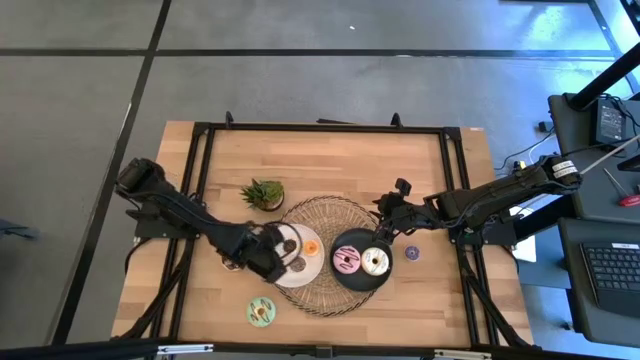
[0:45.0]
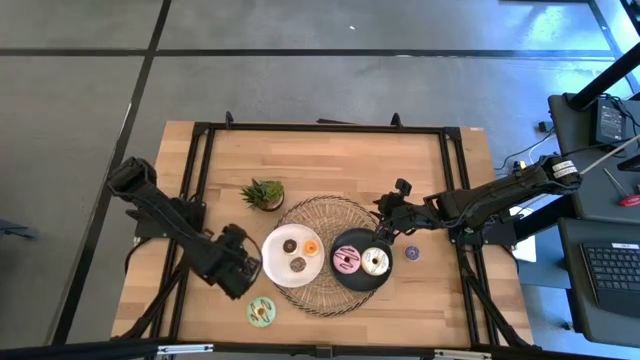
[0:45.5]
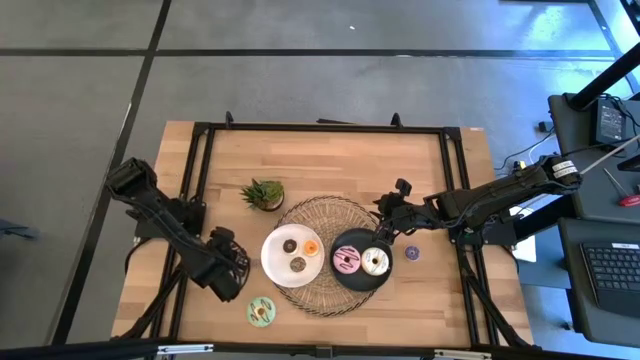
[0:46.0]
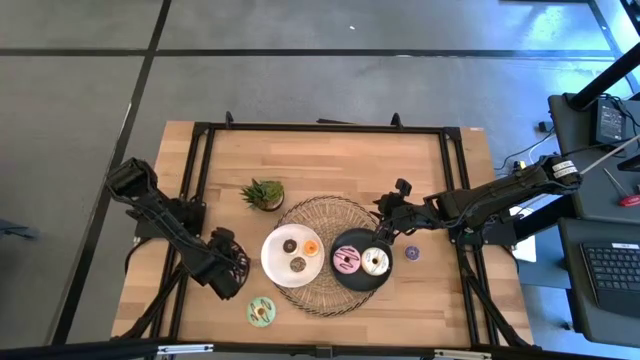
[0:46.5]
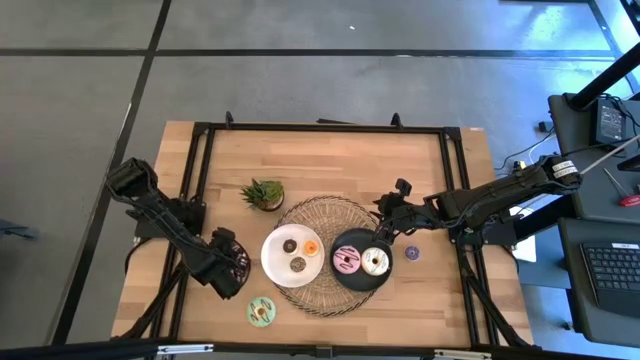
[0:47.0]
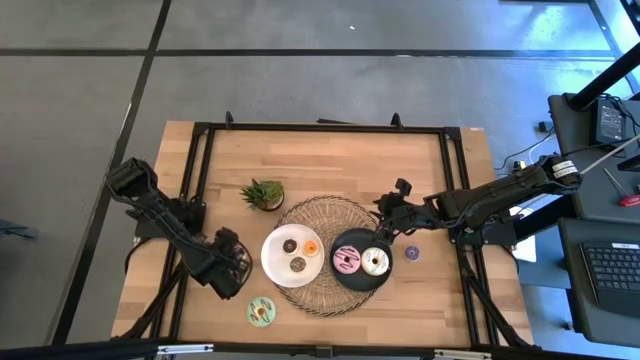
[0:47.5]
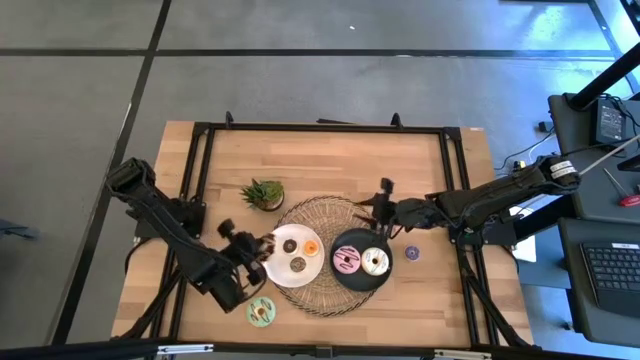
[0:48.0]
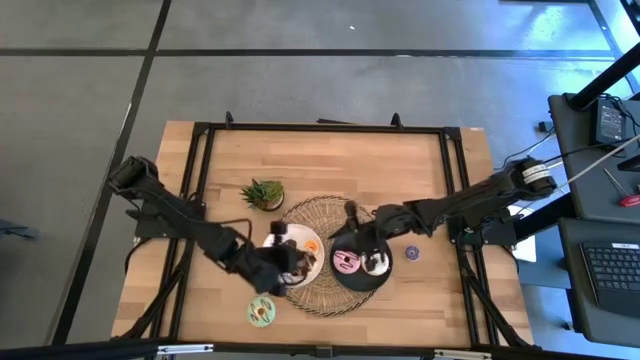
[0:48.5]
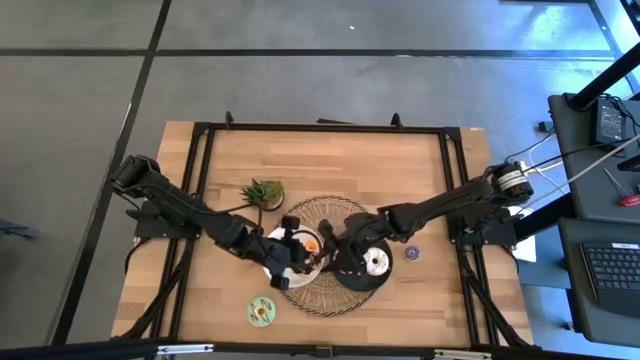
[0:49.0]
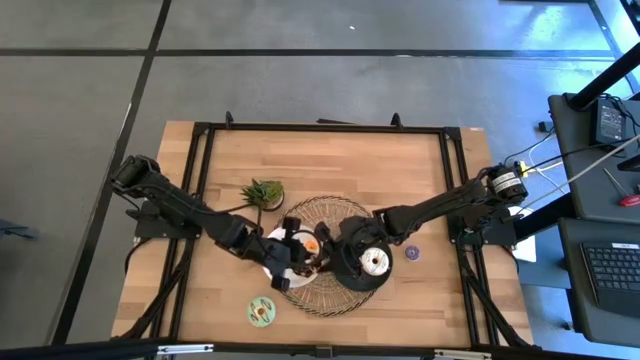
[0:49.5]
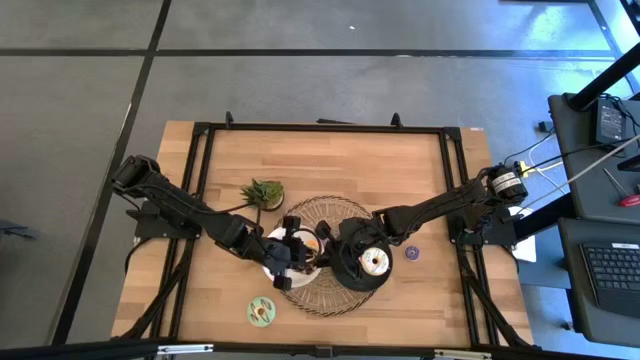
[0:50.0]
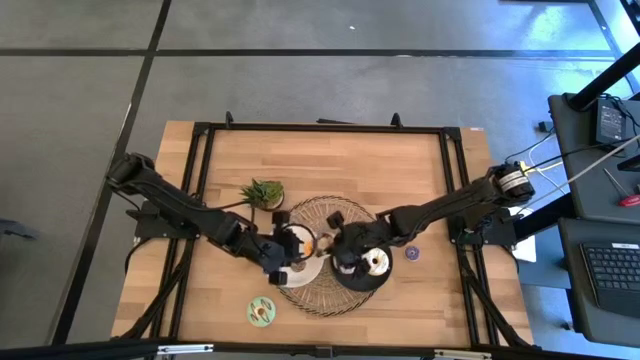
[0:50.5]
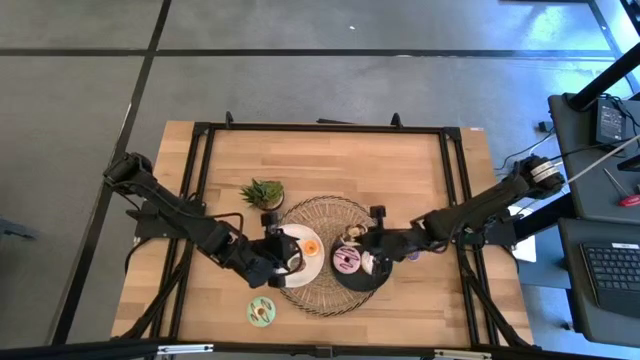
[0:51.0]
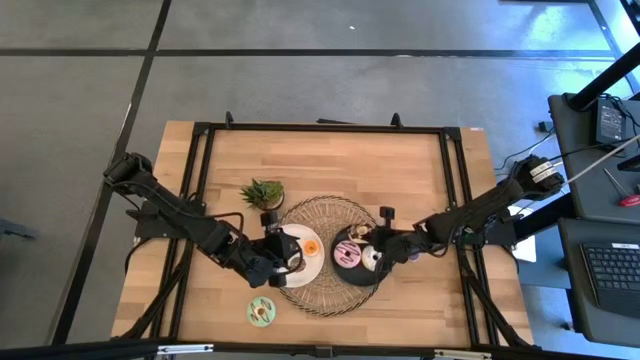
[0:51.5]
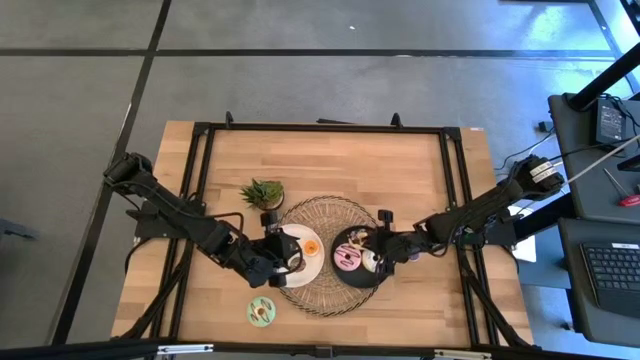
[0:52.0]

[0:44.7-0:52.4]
Task: Pick & Place donuts
Put the large black donut on the black plate

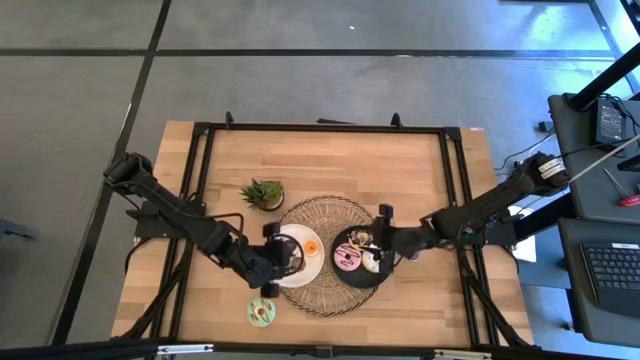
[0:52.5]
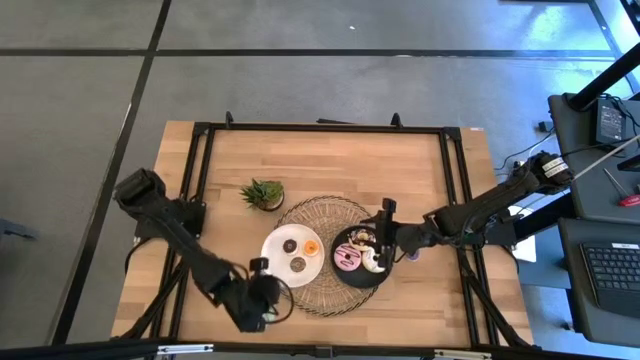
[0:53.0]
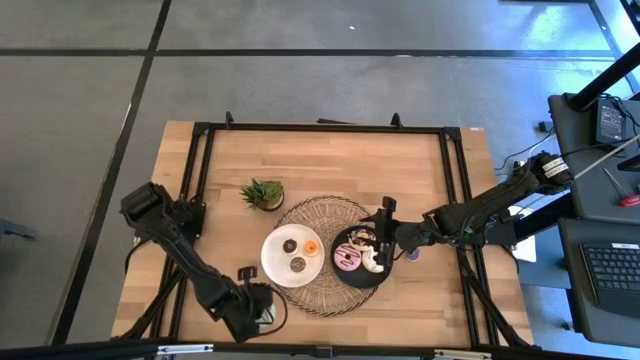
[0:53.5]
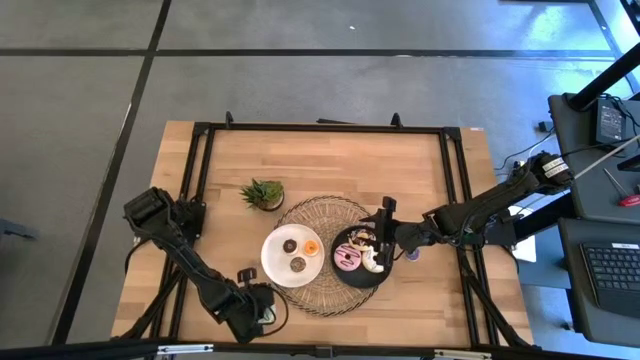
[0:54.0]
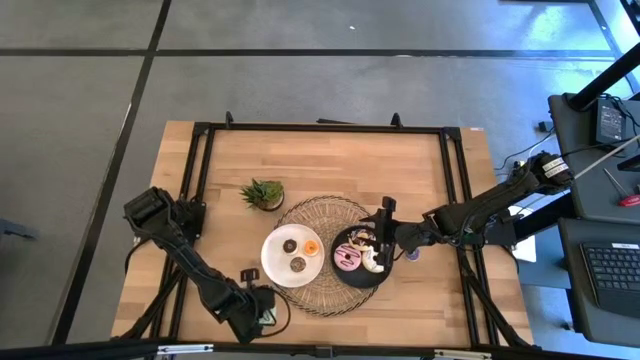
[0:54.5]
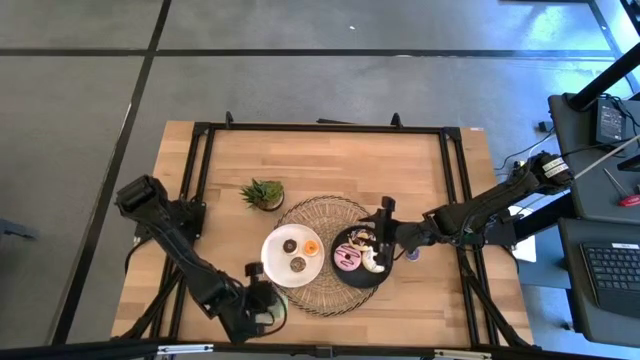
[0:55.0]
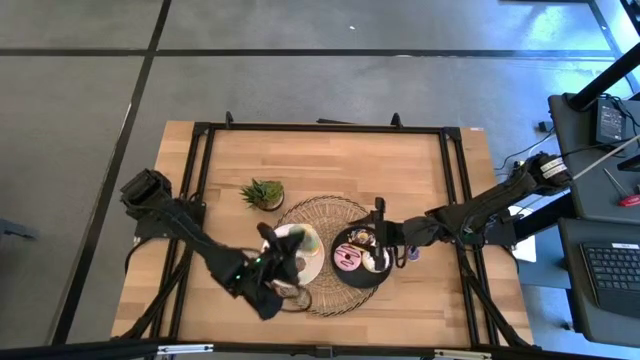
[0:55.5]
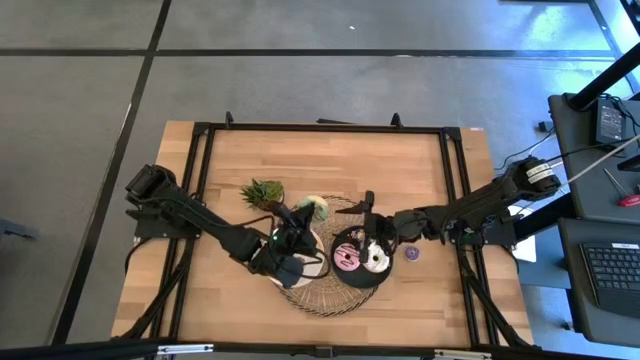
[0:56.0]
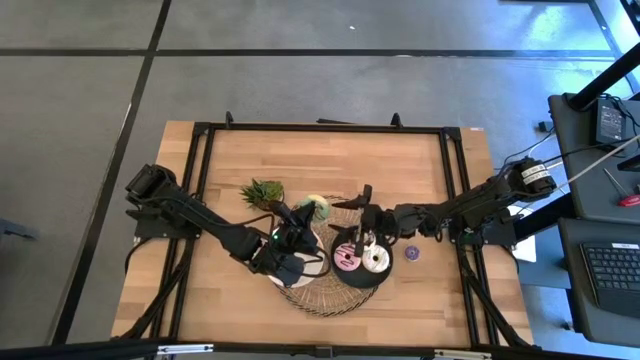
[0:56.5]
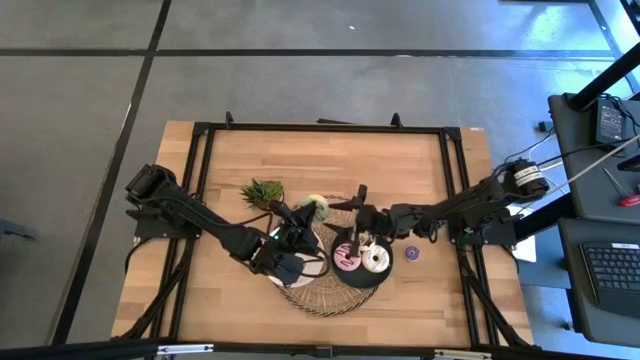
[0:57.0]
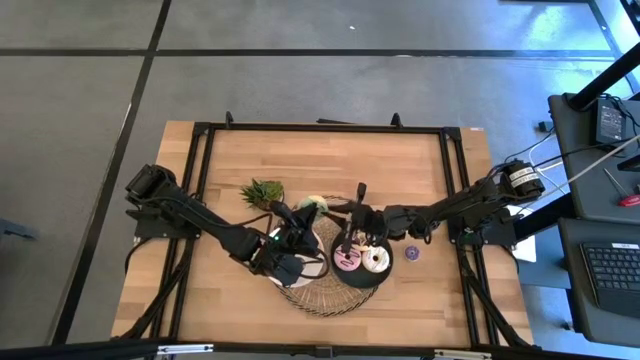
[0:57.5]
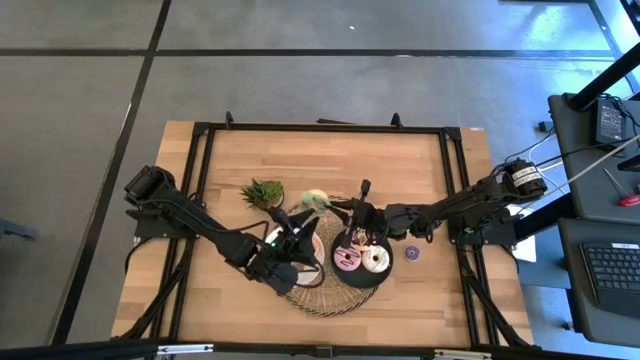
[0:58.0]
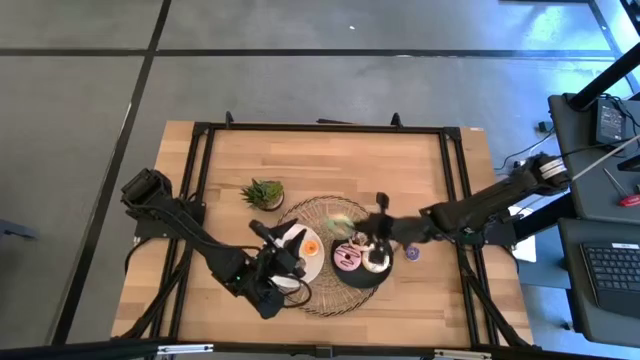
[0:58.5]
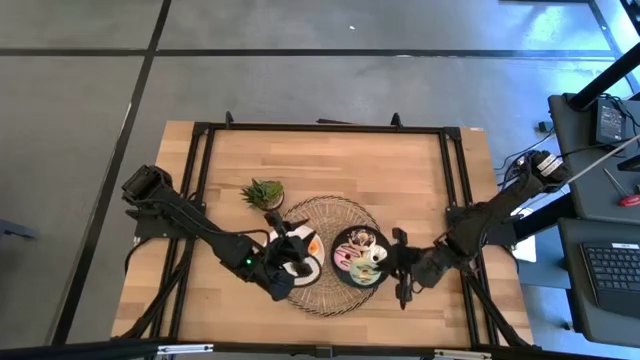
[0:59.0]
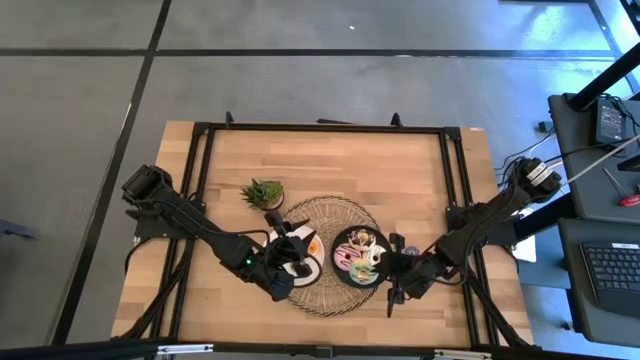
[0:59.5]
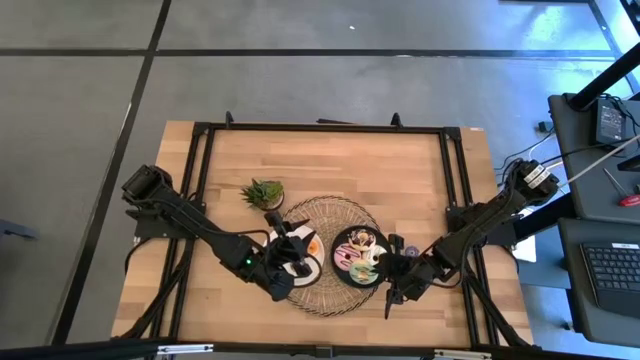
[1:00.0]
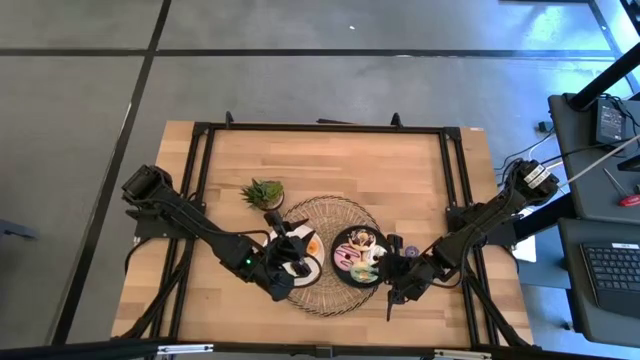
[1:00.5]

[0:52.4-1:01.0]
Put the large green donut on the black plate

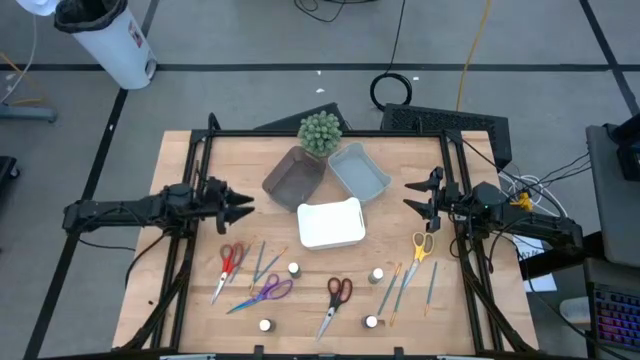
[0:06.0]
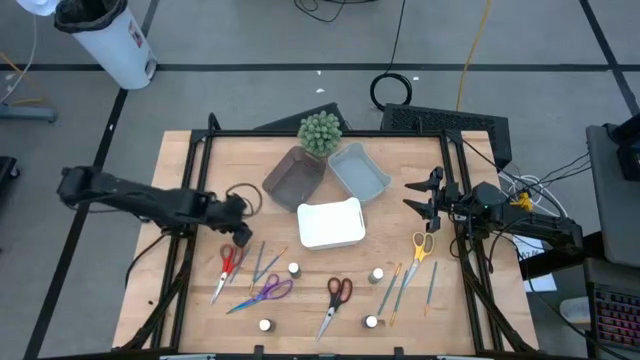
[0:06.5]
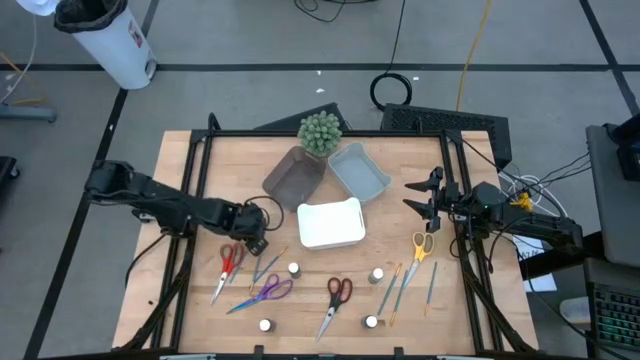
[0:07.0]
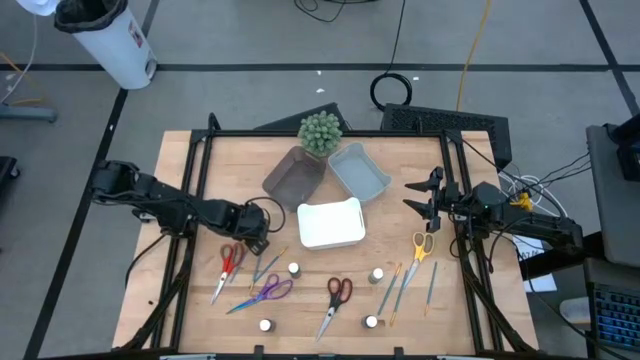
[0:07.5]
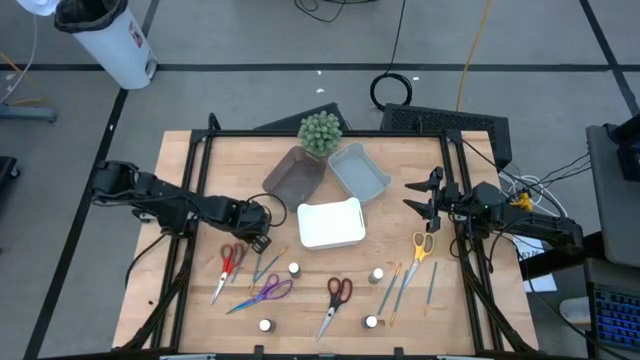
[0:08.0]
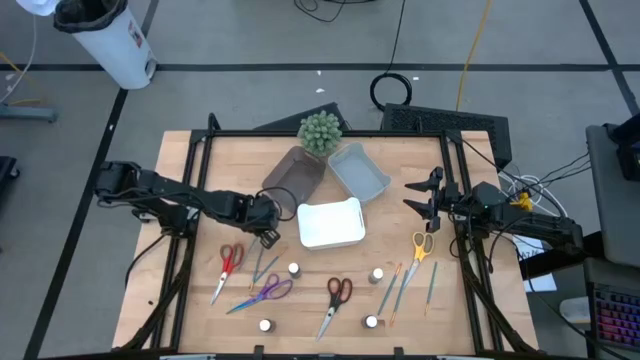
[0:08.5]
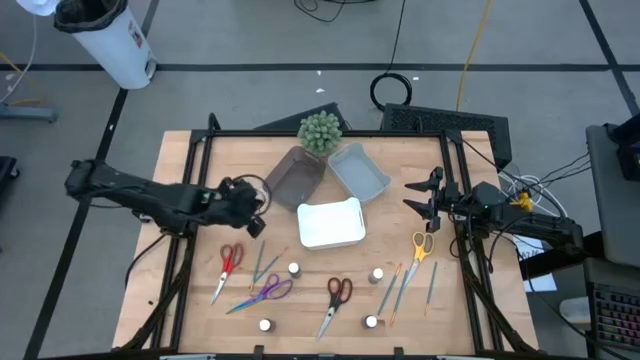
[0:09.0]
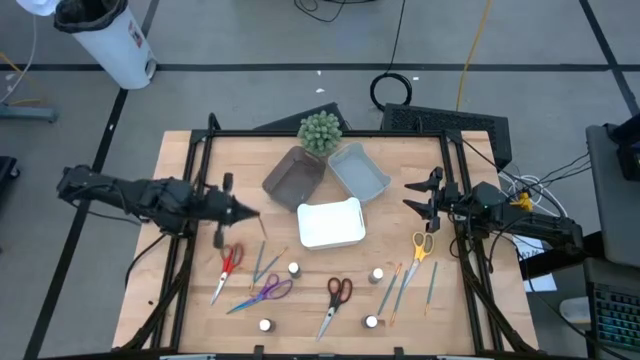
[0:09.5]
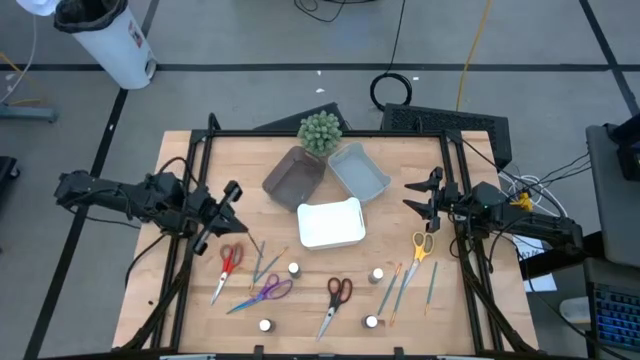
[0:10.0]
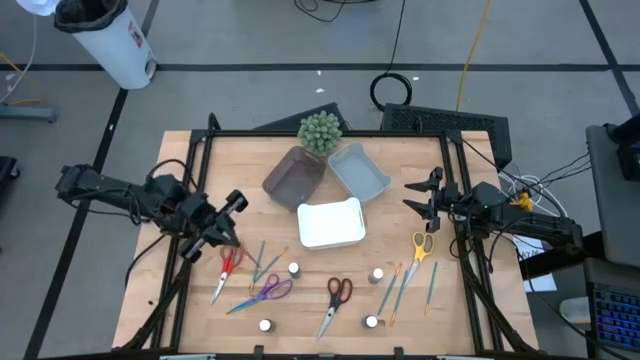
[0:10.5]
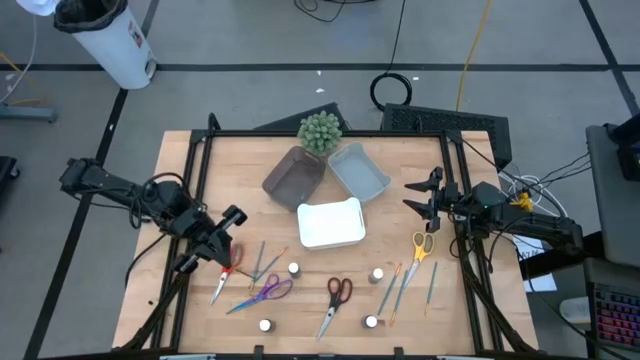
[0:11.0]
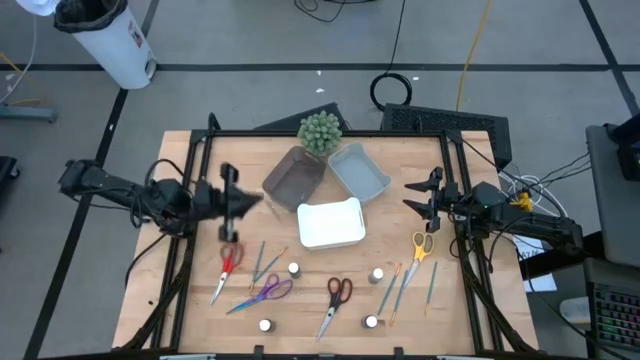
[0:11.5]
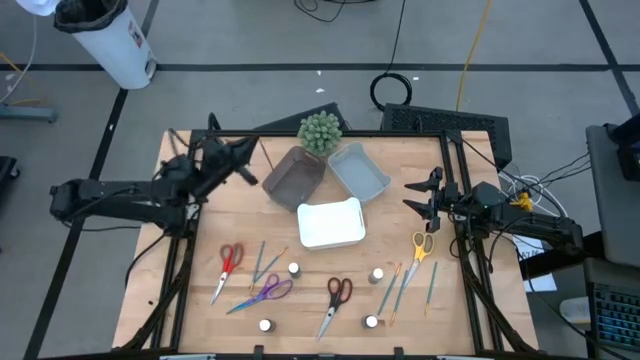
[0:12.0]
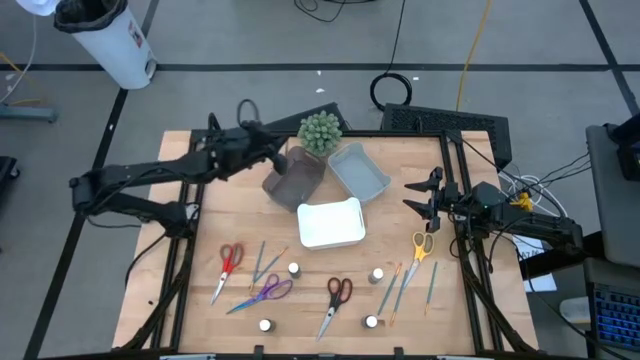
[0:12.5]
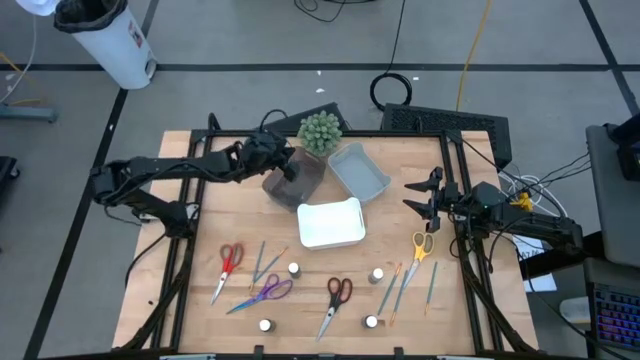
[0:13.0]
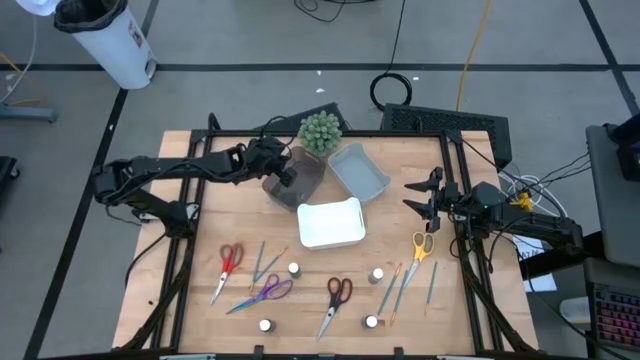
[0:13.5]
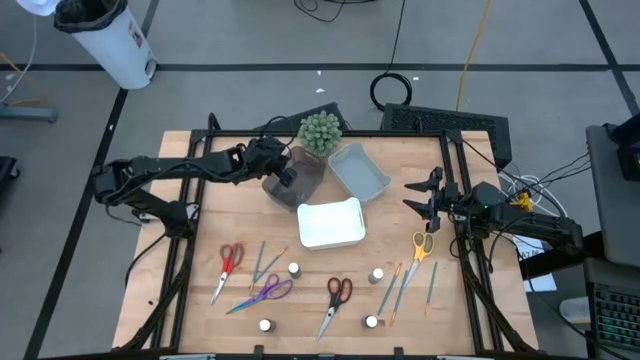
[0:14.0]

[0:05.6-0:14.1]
Task: Pick & Place Paint Supplies
Put the blue paint brush into the black bin
